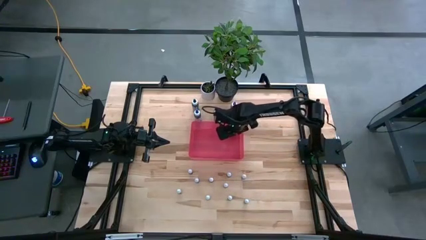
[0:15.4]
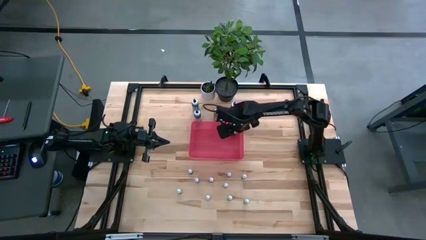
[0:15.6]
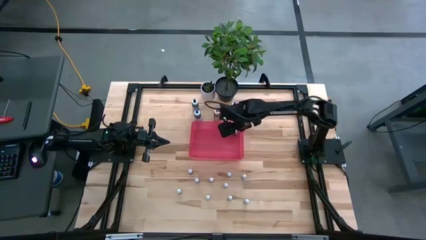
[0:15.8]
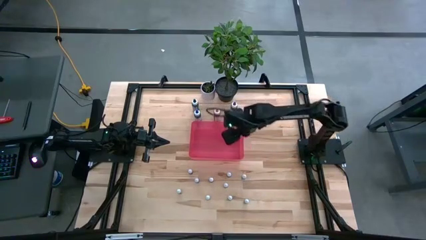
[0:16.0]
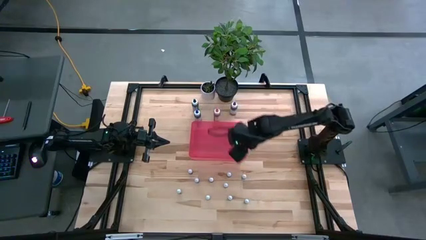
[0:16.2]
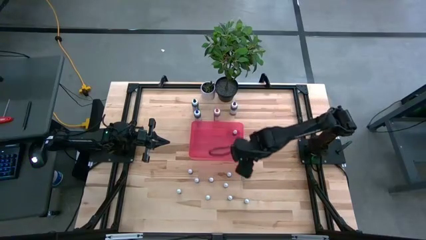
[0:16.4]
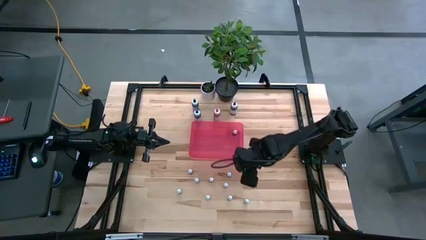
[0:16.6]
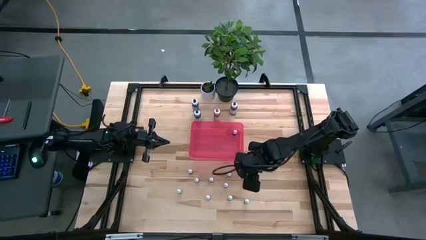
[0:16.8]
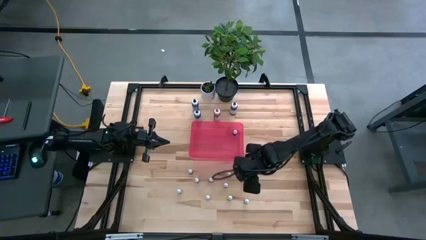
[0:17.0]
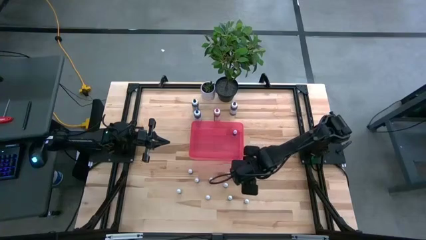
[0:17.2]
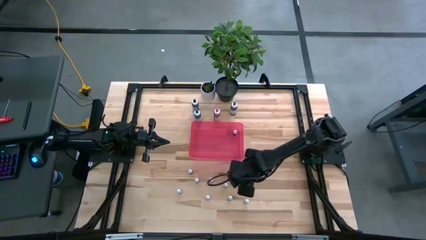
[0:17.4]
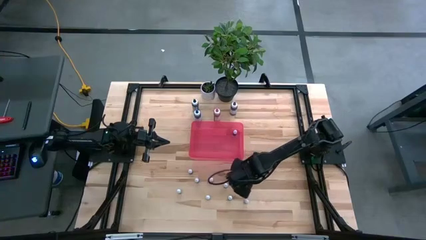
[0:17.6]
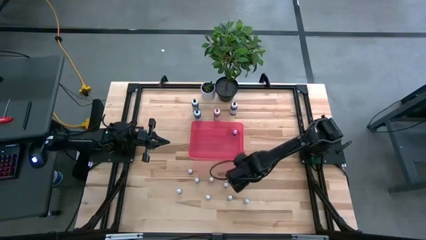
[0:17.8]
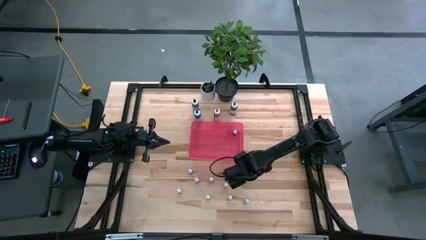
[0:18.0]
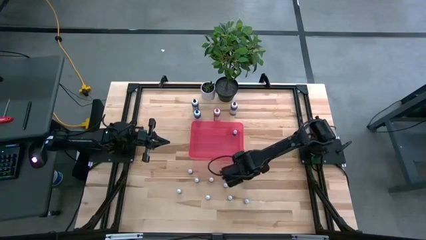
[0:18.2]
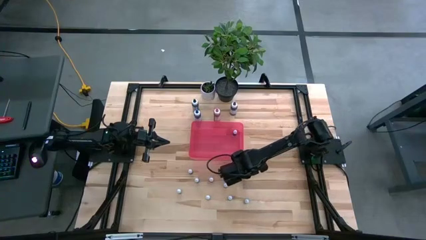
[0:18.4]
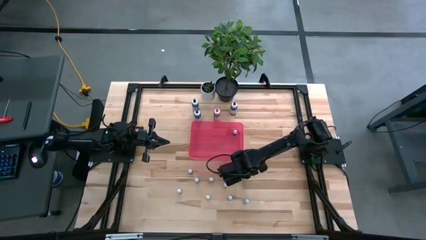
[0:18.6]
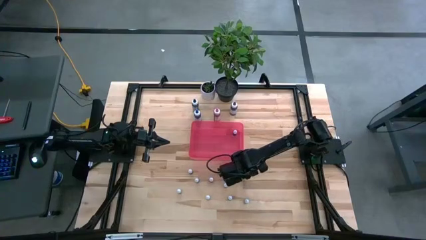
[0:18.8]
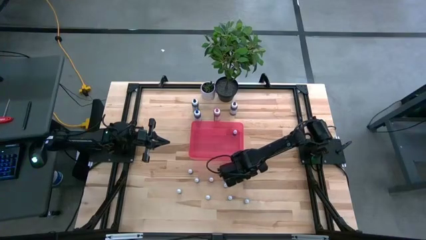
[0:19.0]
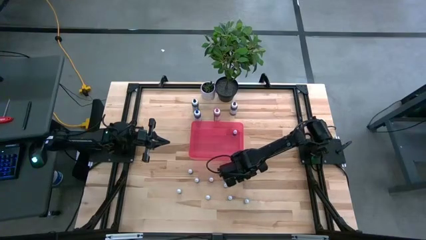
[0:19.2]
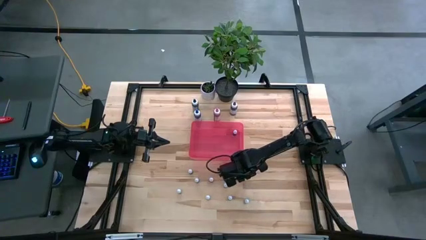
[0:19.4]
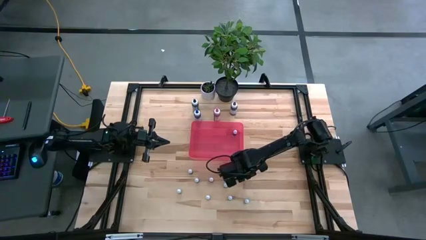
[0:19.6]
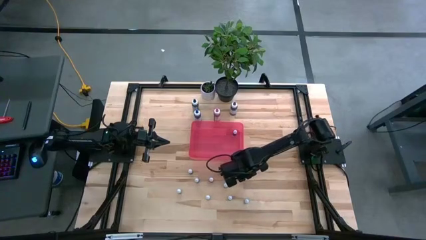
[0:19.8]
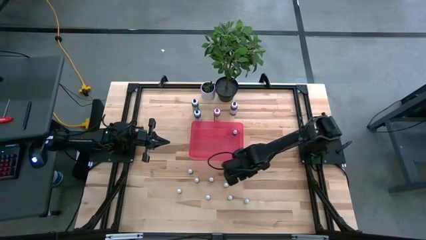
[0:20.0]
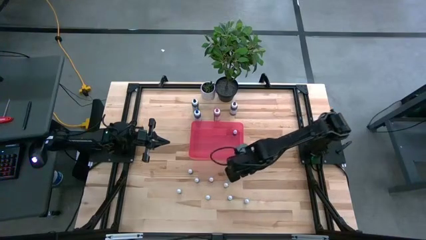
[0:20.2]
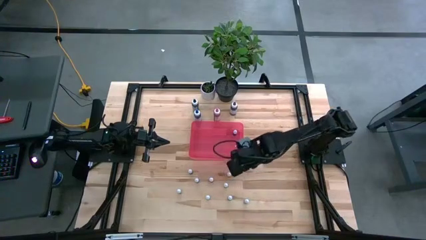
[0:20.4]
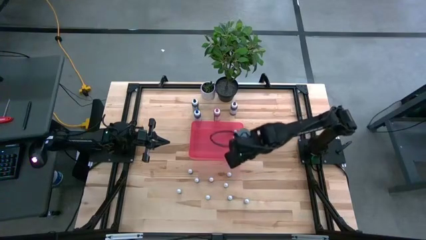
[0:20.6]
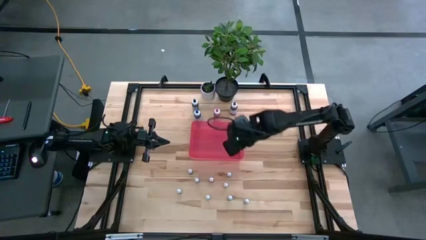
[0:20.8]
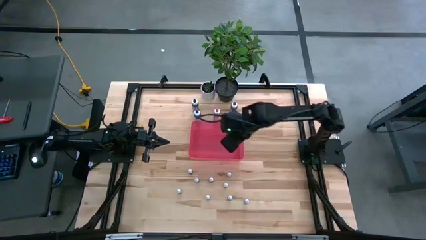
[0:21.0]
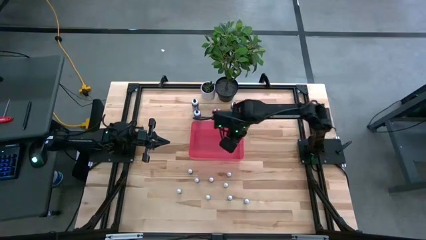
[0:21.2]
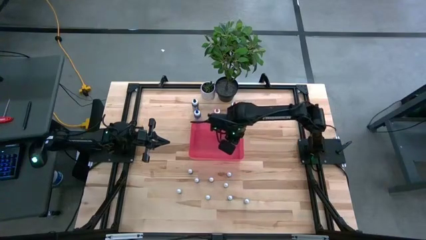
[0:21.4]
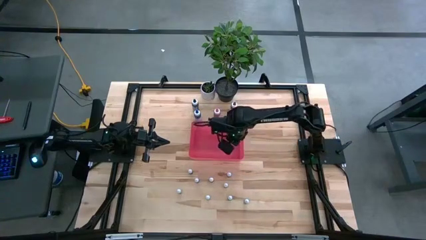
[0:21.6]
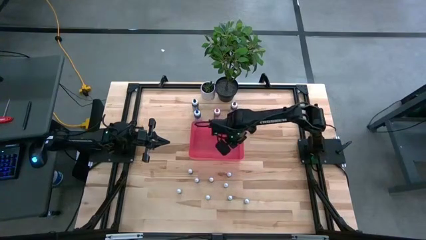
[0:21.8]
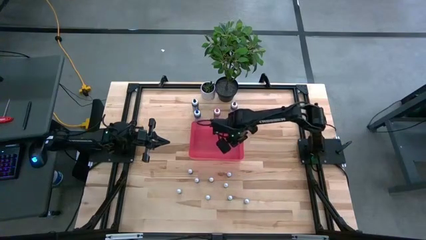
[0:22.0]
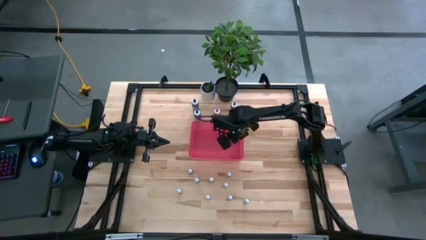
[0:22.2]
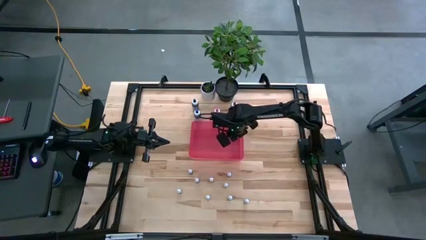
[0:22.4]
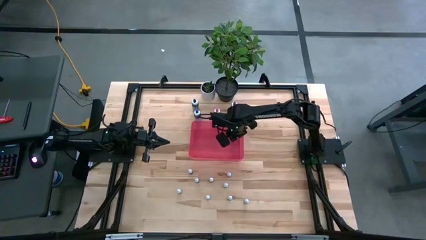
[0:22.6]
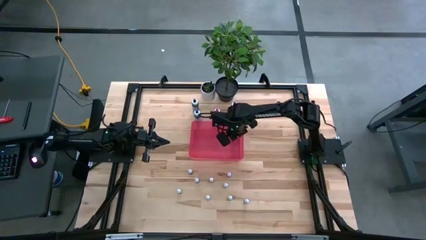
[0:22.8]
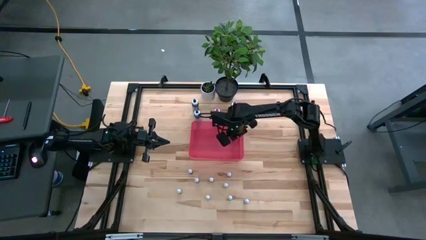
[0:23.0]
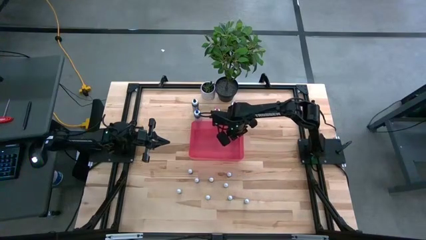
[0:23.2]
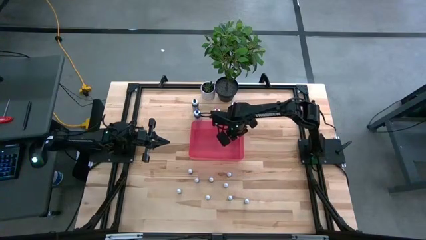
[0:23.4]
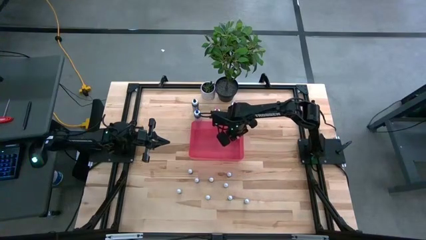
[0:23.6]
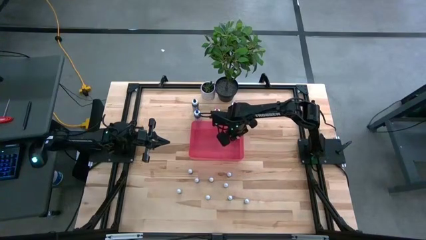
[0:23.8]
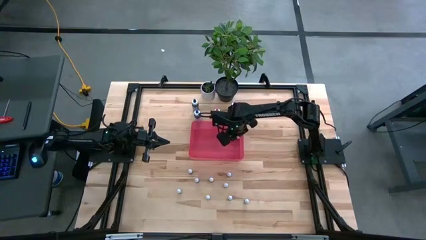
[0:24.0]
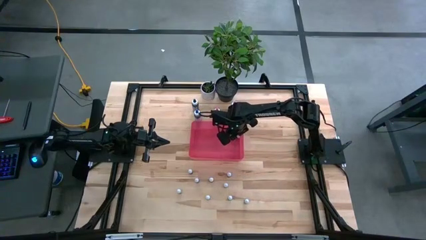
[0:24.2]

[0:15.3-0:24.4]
Task: Pick & Place food coloring
Put the small green food coloring bottle into the pink container

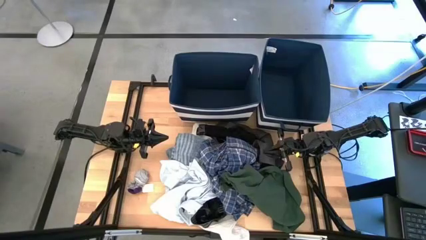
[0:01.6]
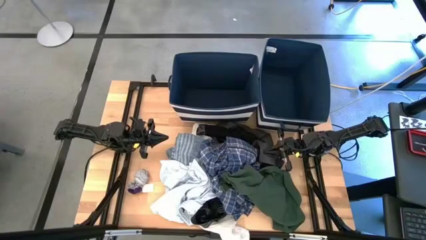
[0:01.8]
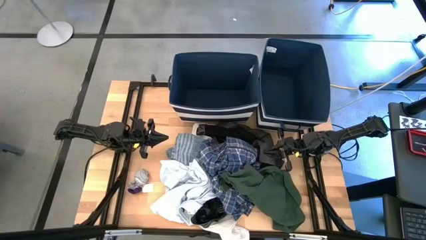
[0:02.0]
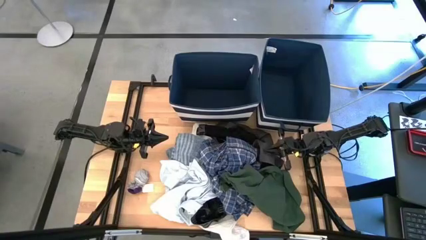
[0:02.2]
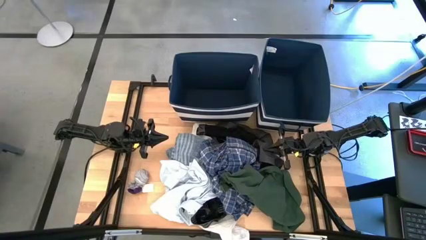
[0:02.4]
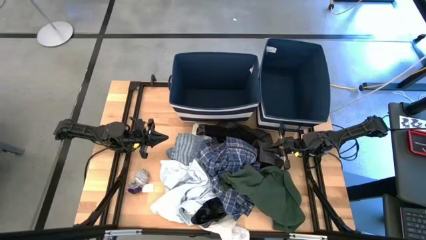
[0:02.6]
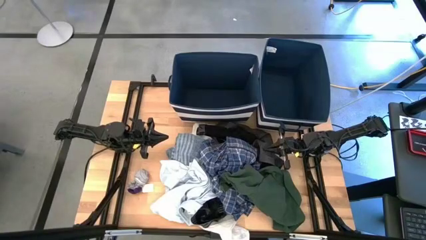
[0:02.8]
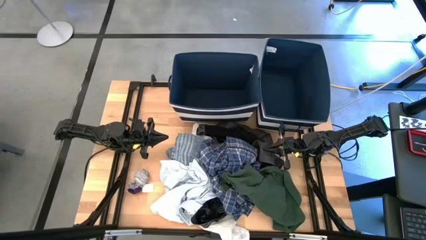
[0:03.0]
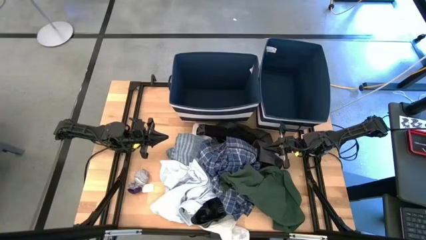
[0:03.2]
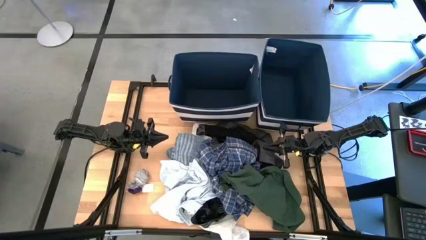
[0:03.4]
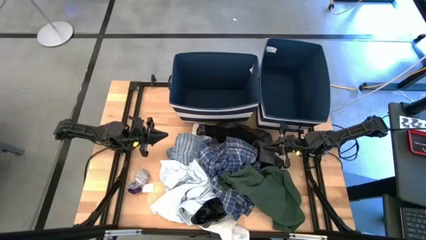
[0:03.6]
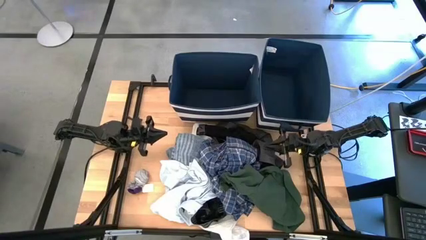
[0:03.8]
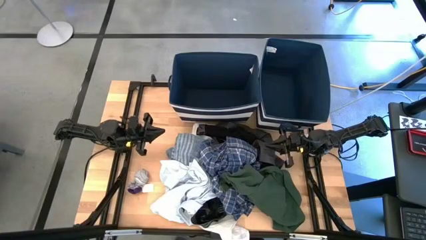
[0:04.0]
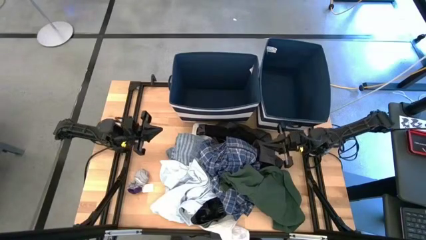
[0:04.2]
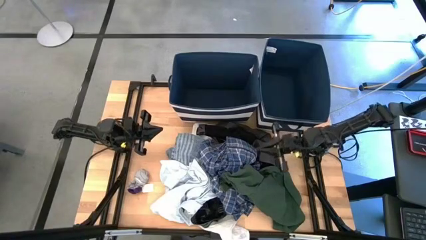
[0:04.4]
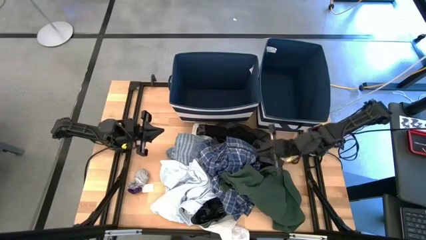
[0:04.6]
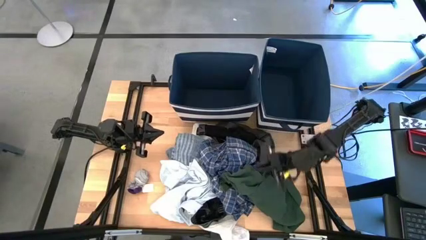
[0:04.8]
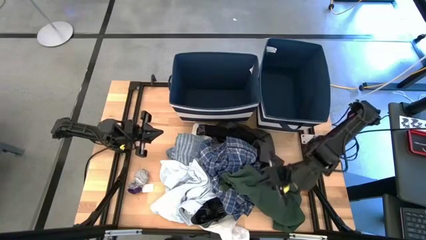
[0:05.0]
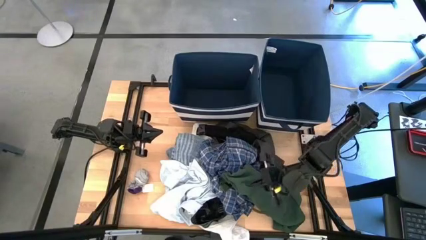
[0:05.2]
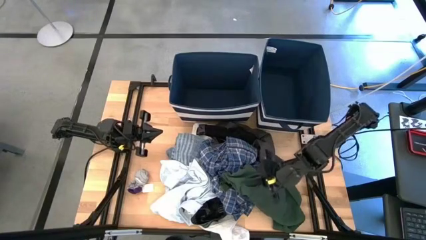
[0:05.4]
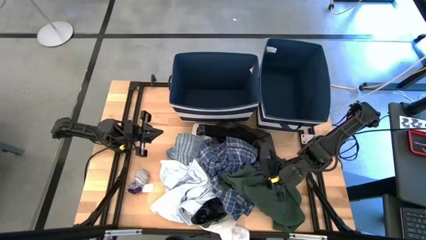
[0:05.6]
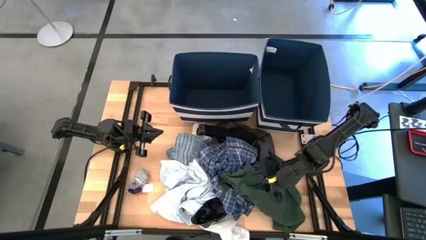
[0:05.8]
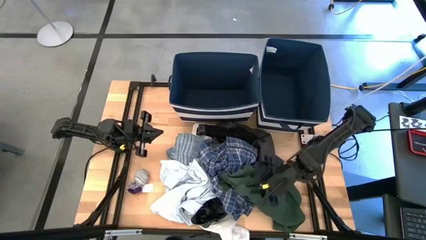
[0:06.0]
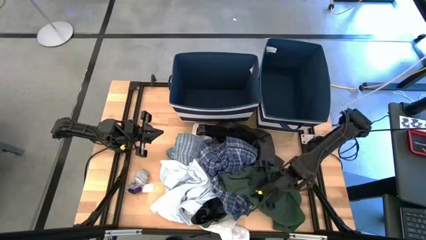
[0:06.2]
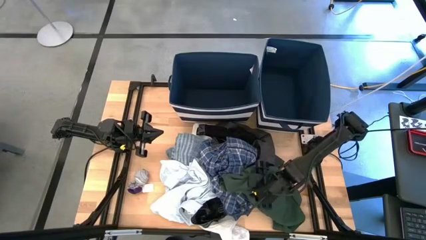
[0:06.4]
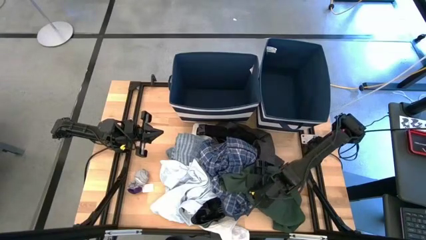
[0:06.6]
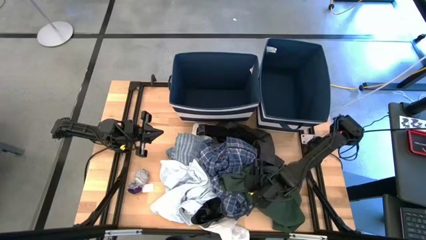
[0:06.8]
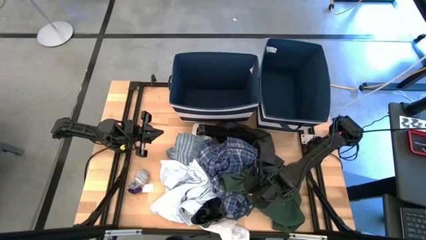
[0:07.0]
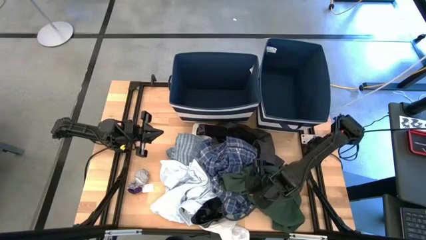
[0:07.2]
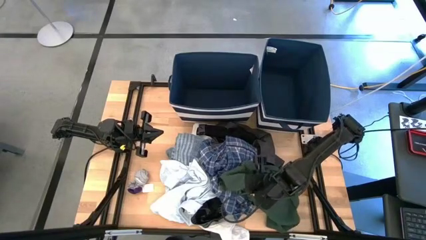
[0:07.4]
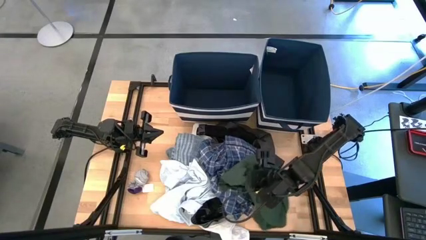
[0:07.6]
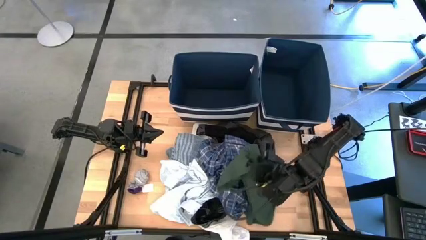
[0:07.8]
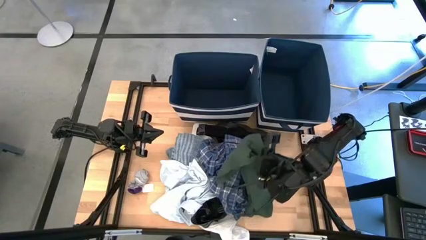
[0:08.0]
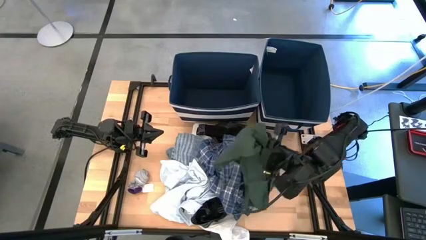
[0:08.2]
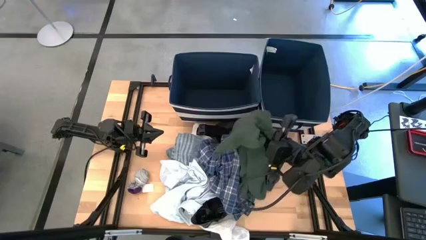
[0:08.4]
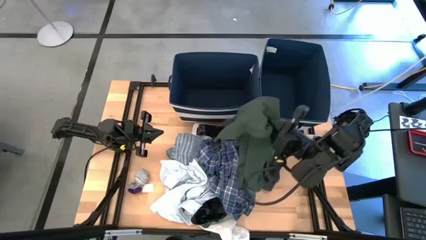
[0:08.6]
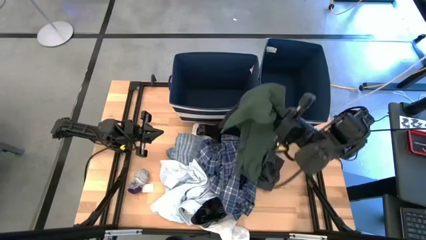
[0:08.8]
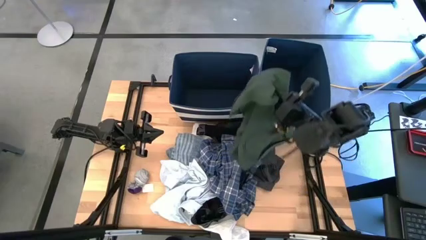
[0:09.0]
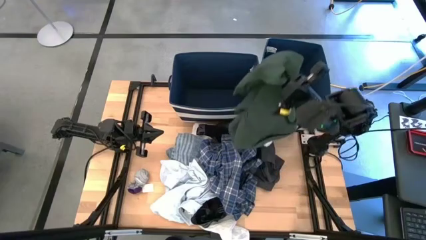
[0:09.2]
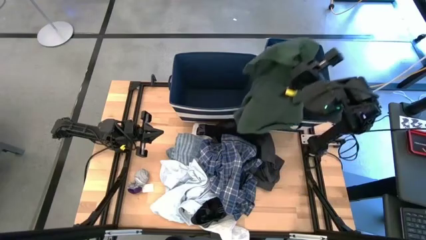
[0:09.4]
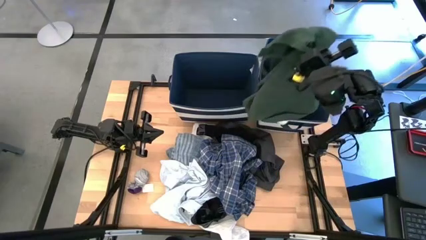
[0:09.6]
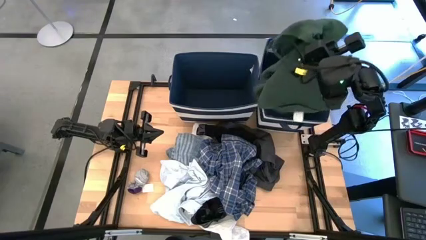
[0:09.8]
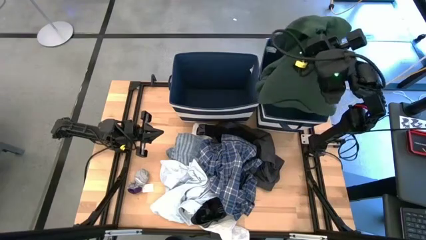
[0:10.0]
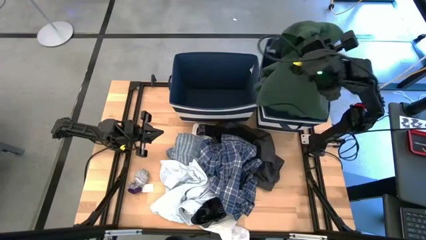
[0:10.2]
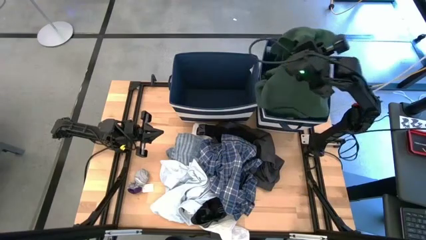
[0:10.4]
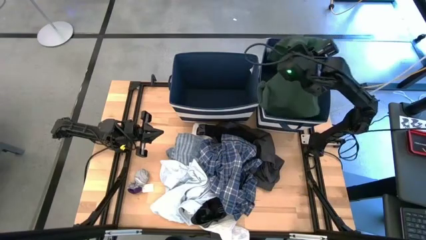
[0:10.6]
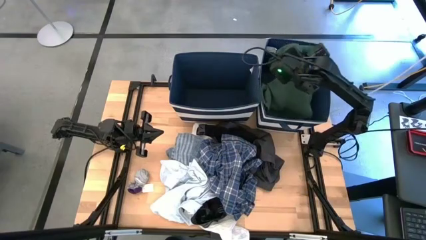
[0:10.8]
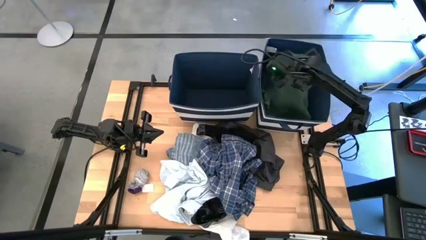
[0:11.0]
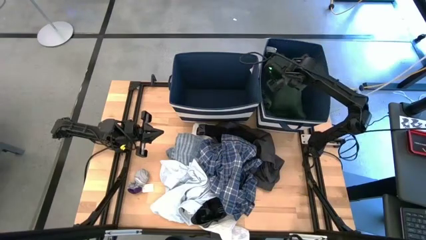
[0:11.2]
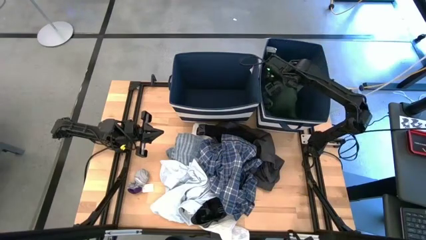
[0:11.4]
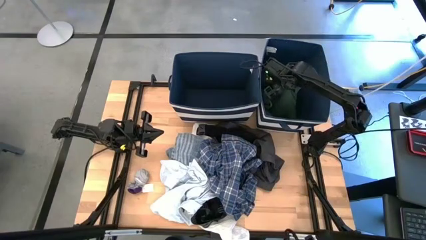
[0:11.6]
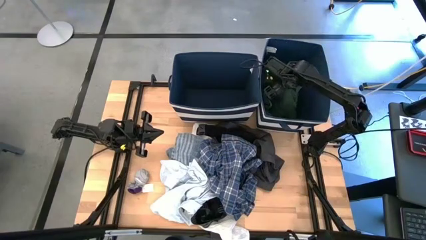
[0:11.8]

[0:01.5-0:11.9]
Task: Sort clothes
Put the green polo into the right blue laundry organizer
